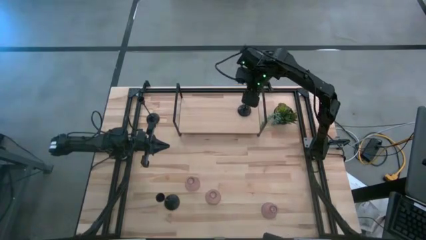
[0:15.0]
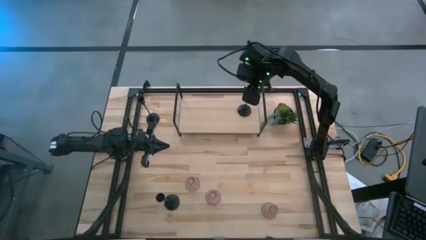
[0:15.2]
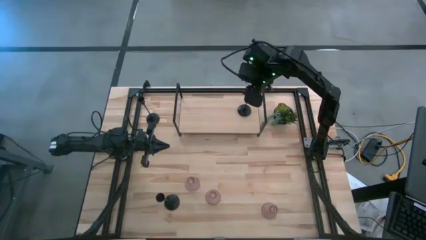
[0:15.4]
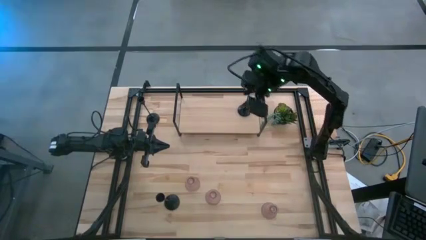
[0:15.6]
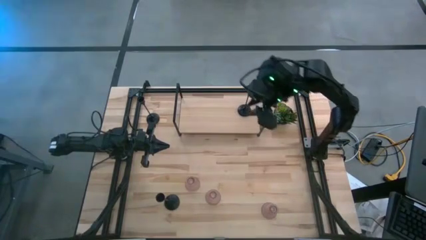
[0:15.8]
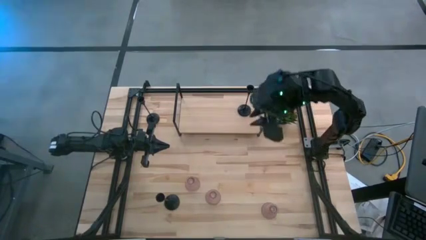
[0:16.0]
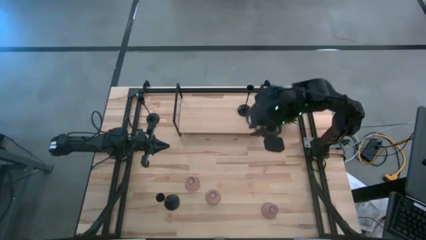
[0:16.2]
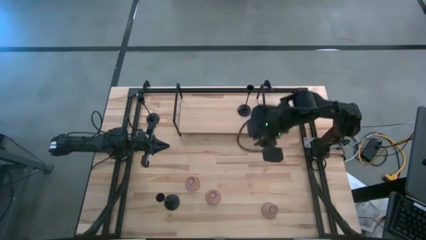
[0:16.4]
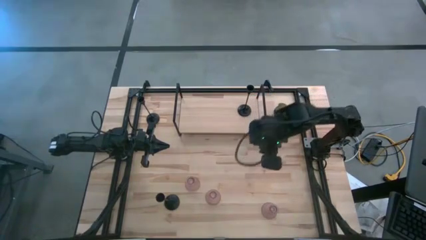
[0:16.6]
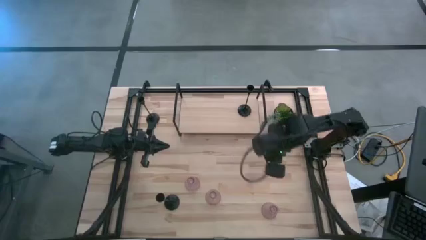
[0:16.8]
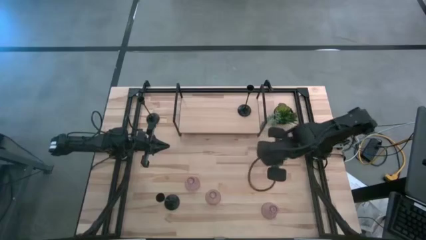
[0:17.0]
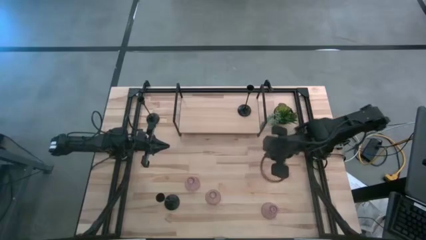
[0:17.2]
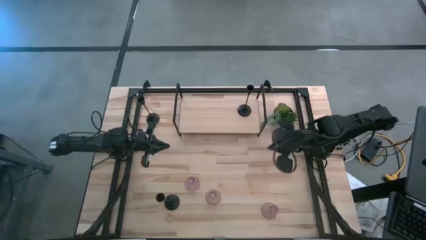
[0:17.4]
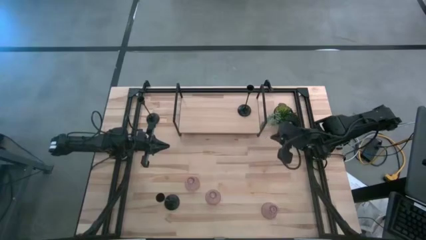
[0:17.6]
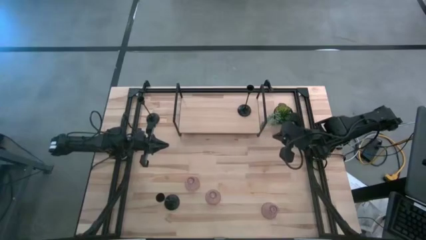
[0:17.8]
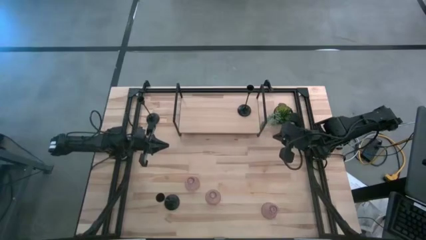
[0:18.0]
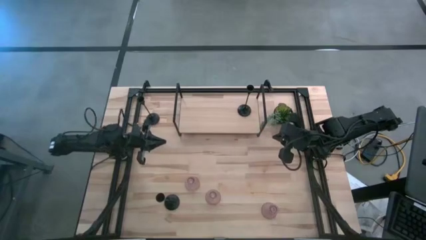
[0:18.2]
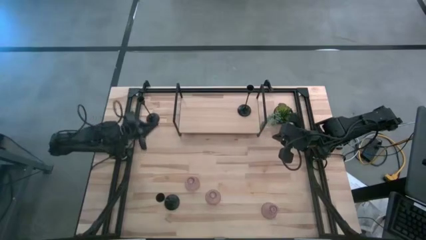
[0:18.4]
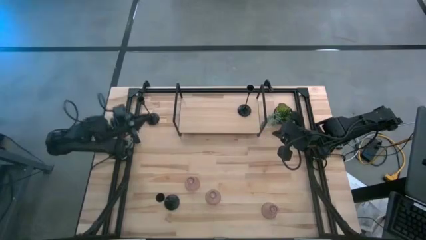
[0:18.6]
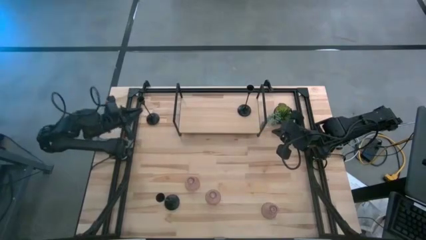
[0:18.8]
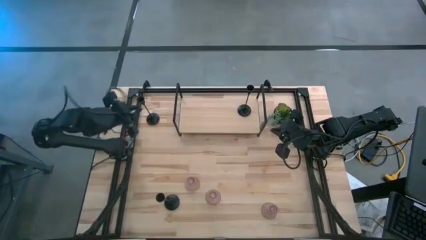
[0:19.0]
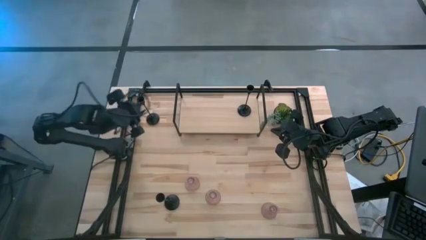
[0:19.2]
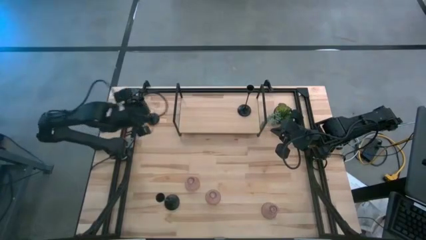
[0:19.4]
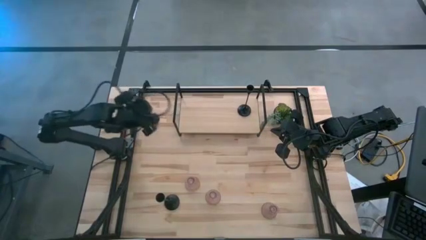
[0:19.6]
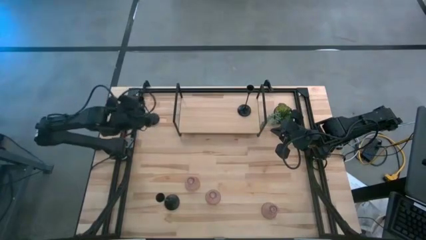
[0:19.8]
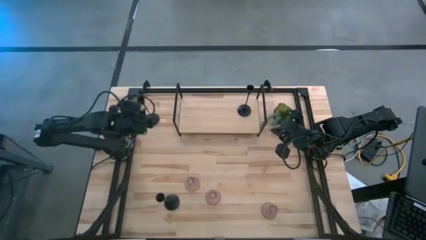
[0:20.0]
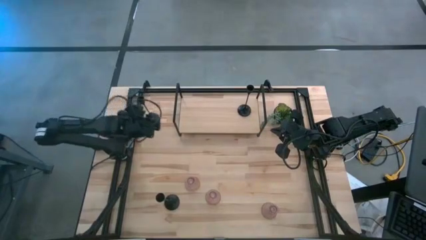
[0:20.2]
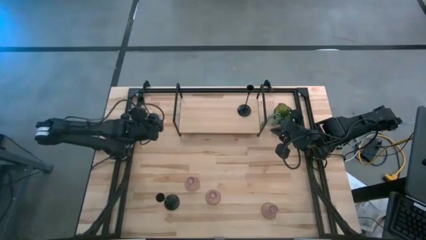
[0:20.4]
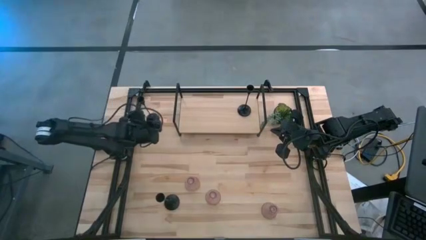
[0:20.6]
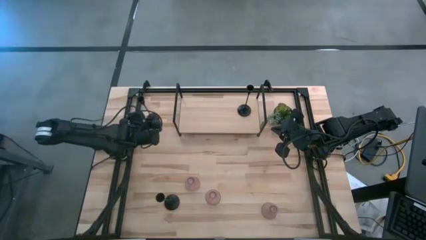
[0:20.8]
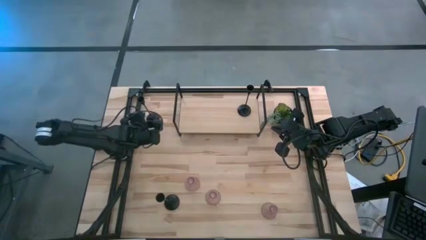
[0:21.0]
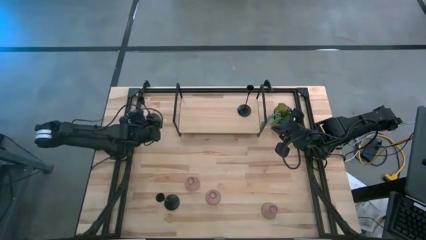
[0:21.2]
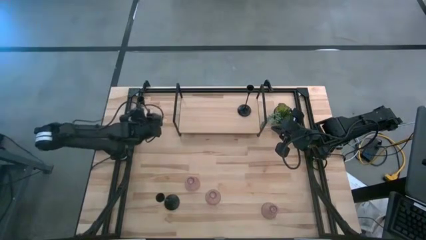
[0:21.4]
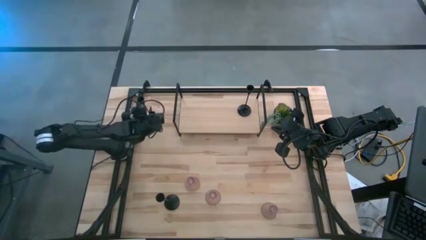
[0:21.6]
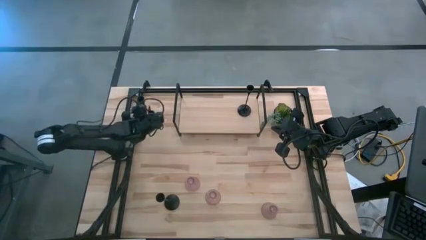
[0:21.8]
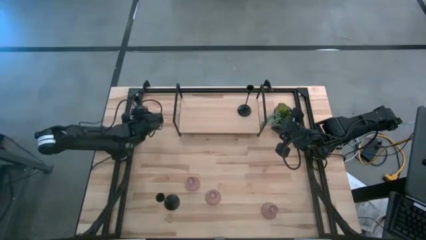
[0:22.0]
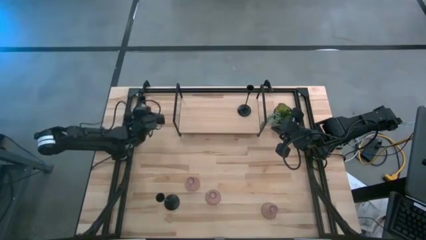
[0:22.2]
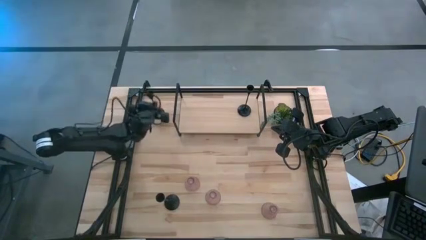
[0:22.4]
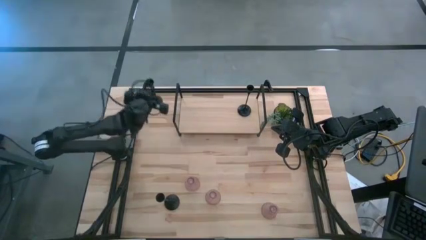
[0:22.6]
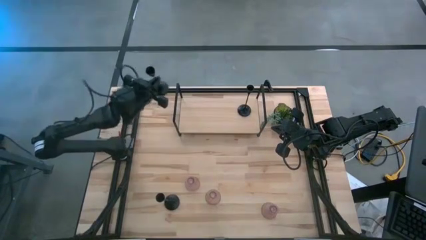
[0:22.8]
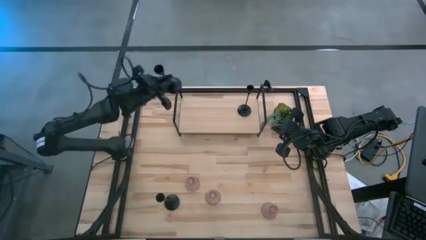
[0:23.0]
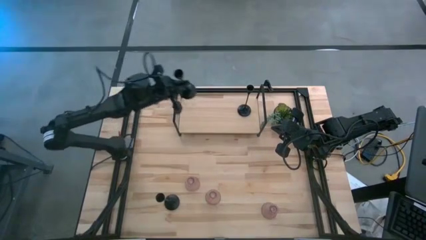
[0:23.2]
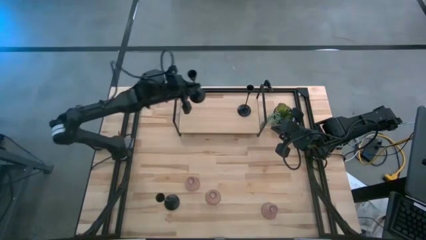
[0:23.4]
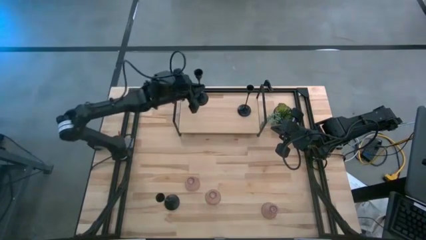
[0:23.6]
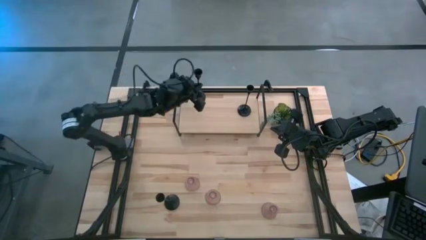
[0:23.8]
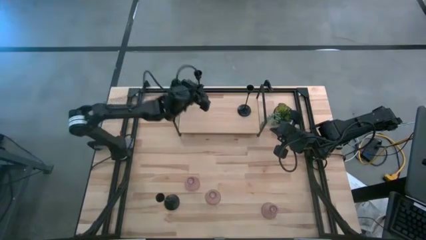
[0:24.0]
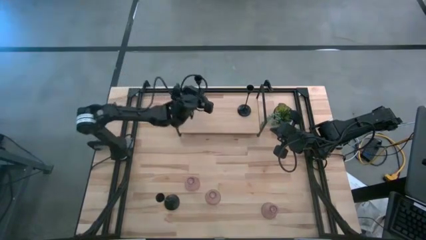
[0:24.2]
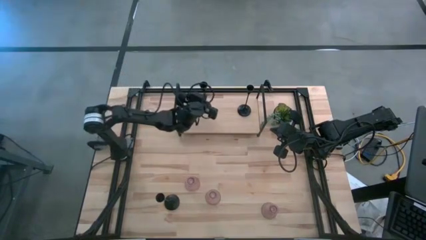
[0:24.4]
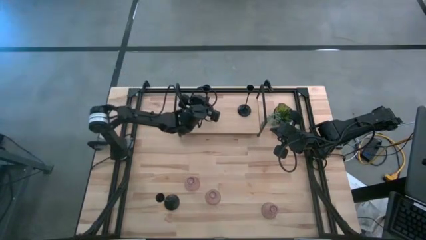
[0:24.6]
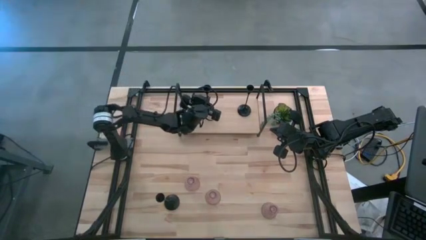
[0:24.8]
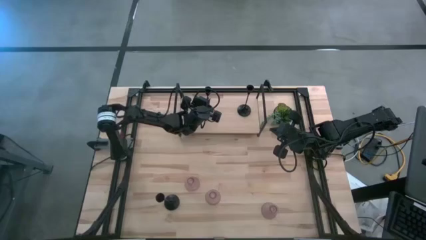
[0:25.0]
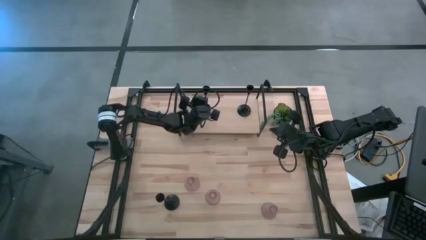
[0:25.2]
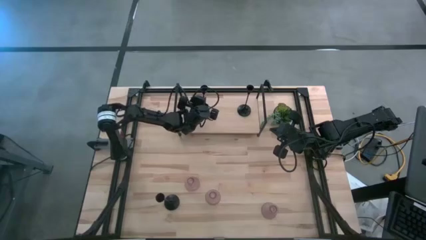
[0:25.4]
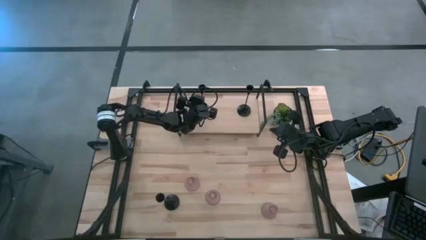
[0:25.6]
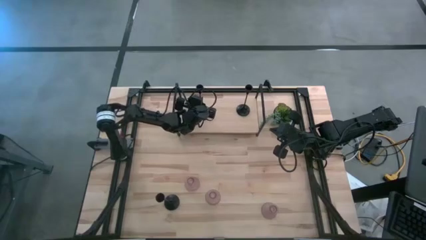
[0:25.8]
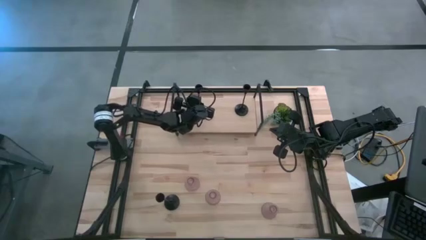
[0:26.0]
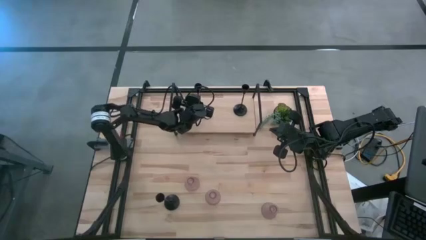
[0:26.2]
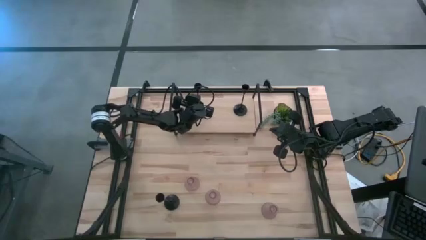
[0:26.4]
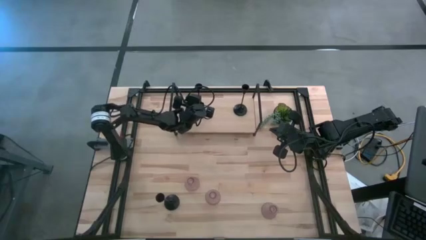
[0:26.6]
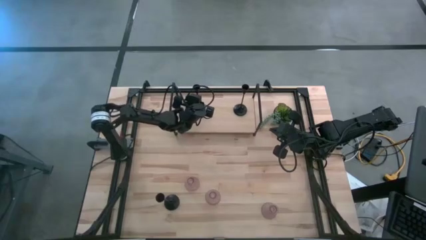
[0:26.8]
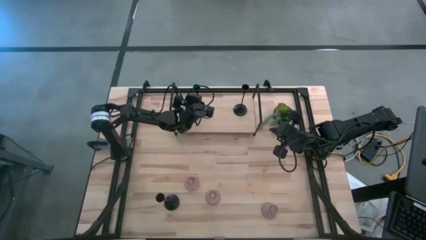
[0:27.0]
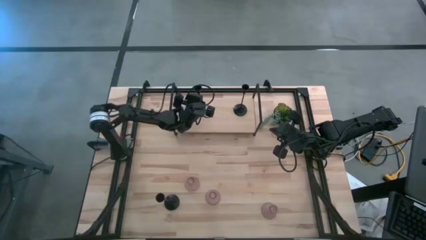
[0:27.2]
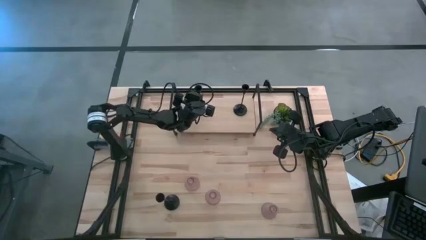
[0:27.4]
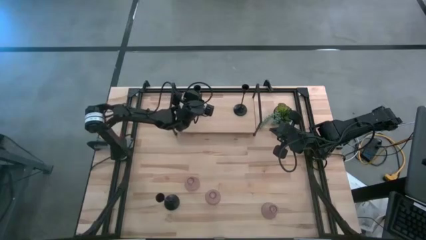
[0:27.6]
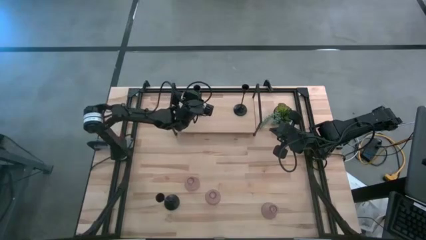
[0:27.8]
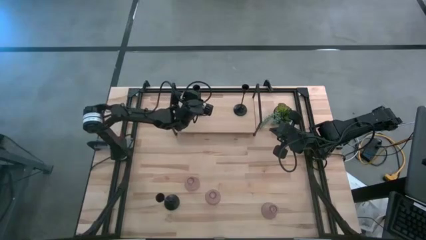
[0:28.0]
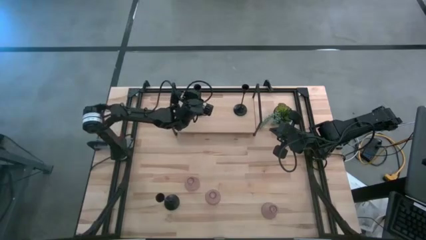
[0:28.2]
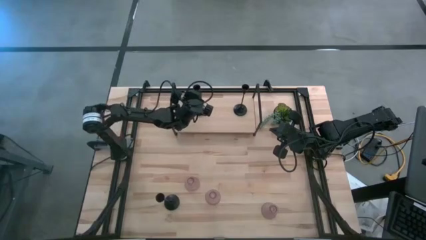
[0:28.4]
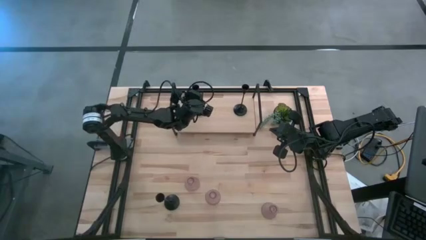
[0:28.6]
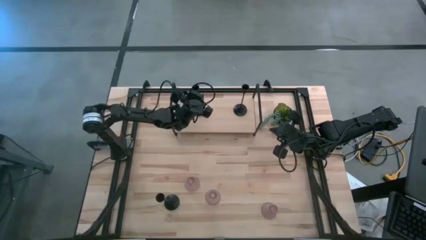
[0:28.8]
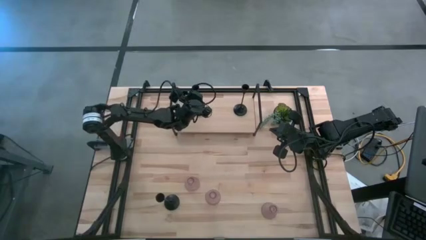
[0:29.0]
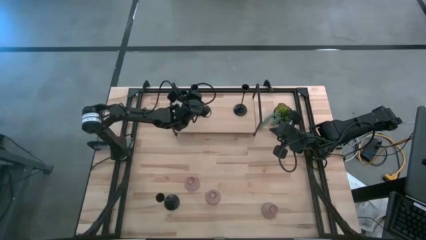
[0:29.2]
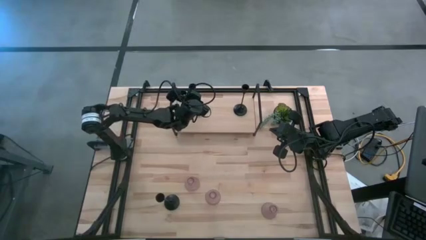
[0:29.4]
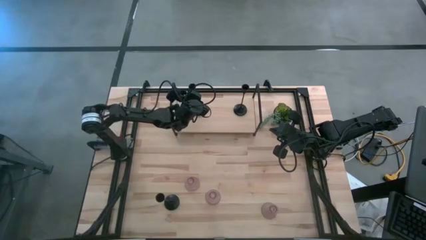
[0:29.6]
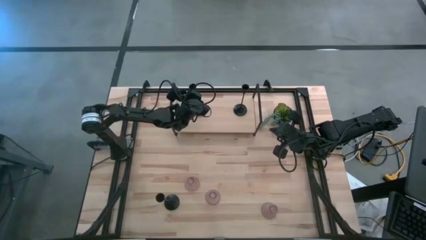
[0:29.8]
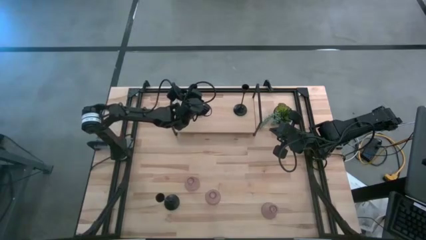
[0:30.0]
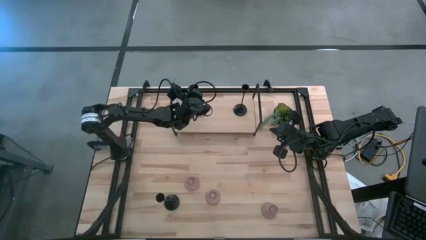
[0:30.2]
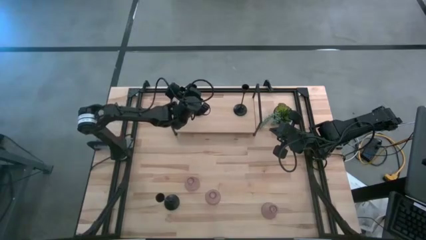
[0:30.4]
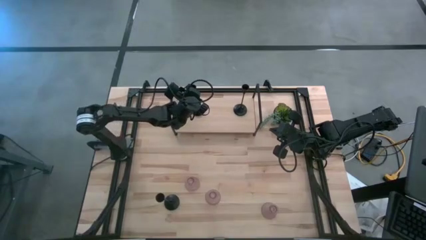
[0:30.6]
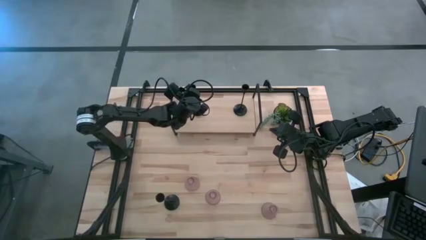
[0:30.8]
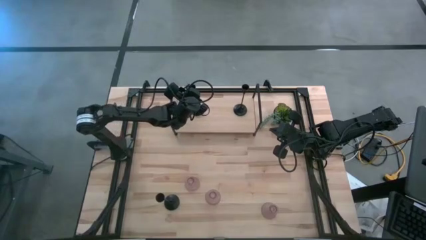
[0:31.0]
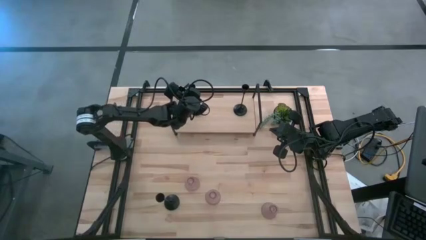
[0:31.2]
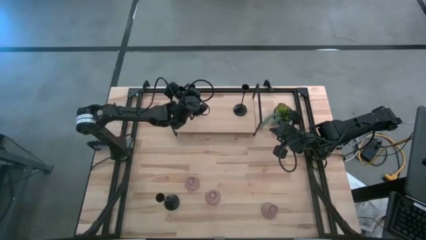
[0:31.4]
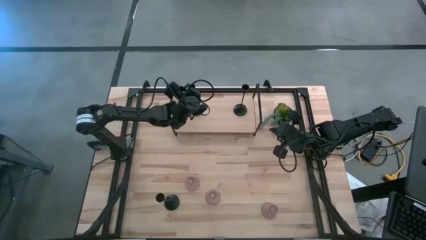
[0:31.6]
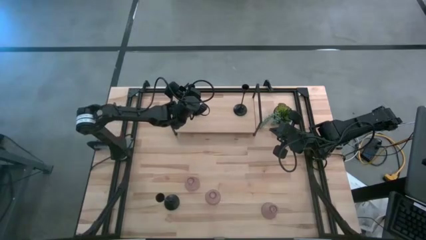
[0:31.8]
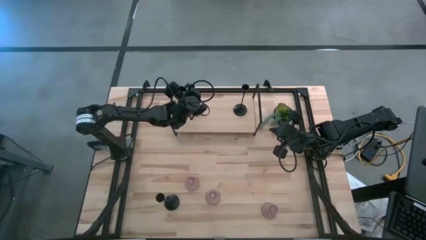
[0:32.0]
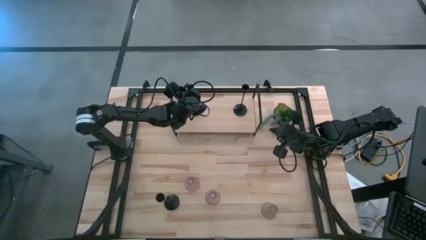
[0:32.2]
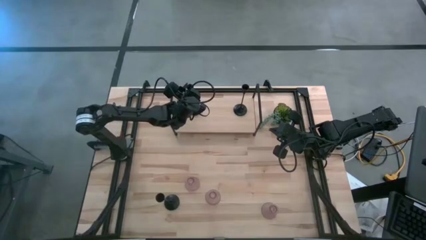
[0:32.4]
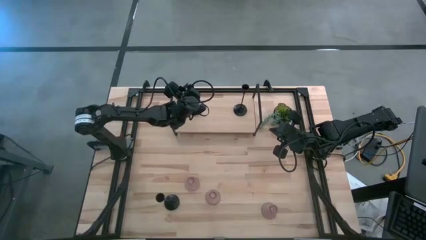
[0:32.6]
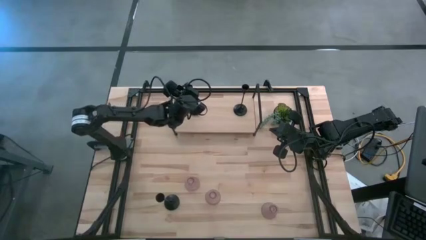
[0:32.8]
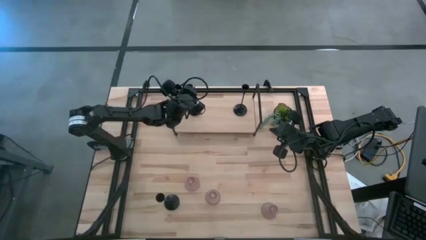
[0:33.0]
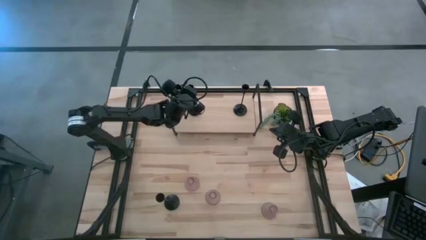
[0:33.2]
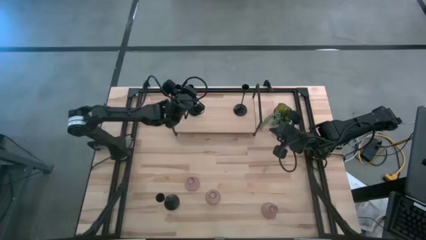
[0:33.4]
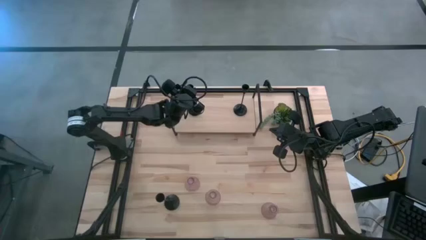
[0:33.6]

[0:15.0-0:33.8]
Task: Pick & Place candle stick holders
Put the top black candle holder on the shelf
